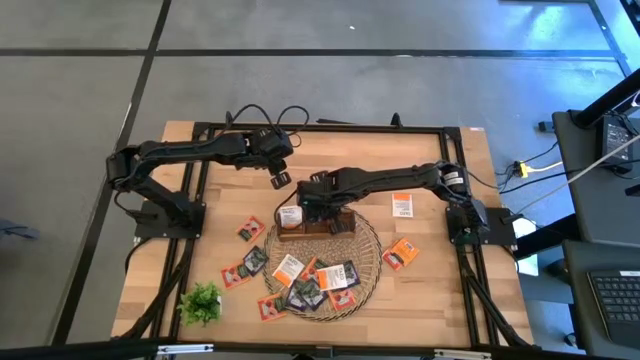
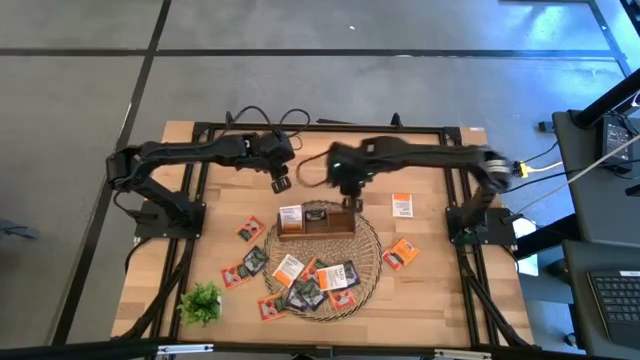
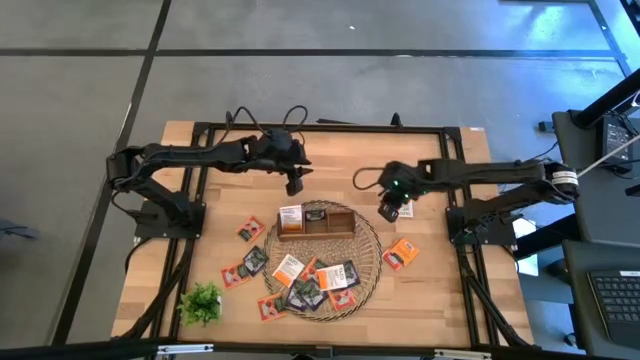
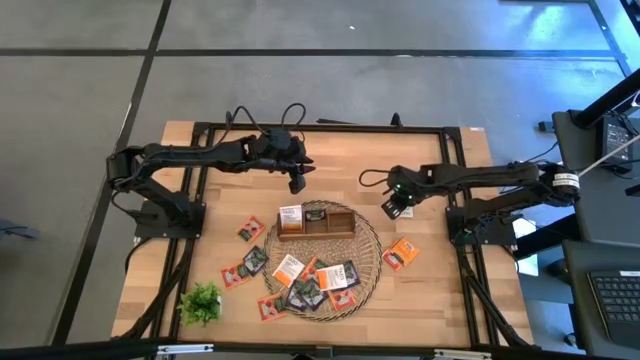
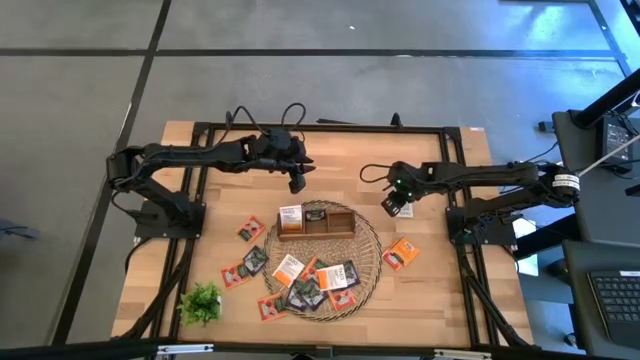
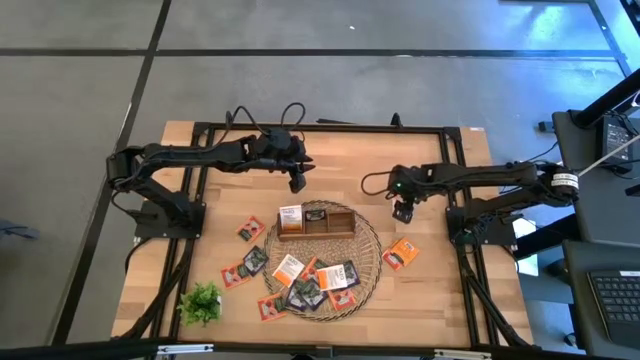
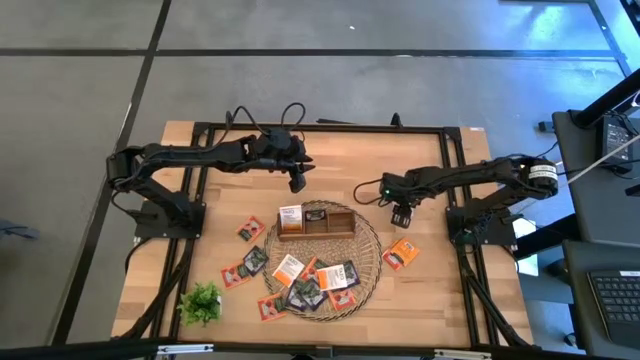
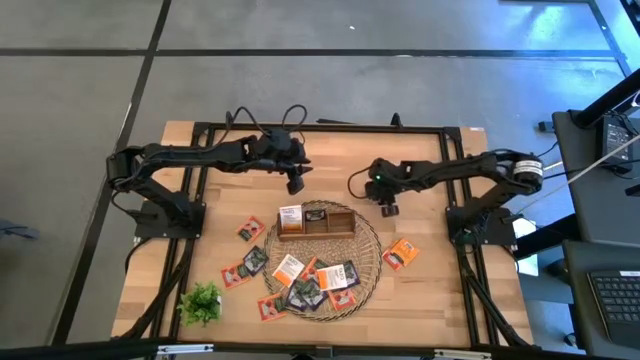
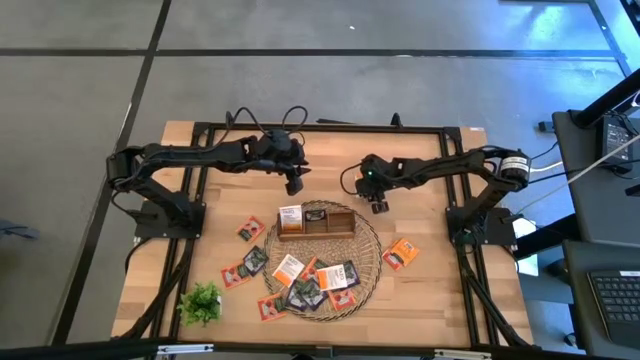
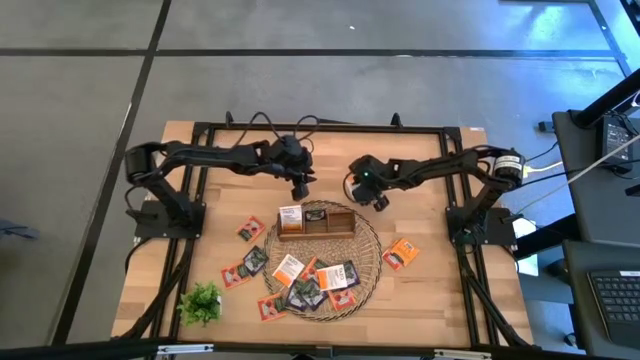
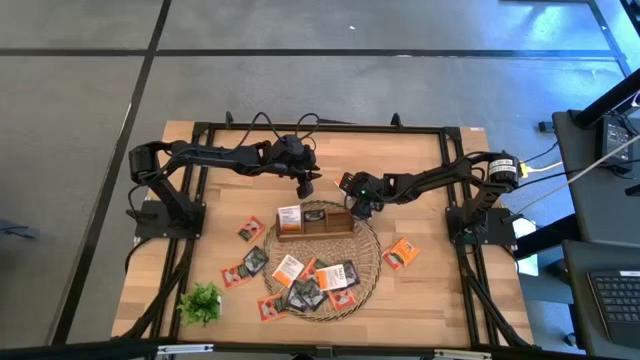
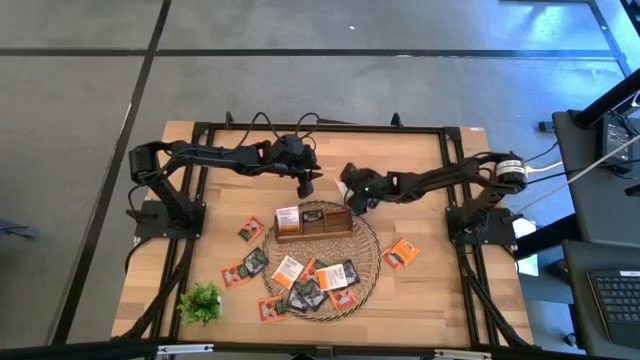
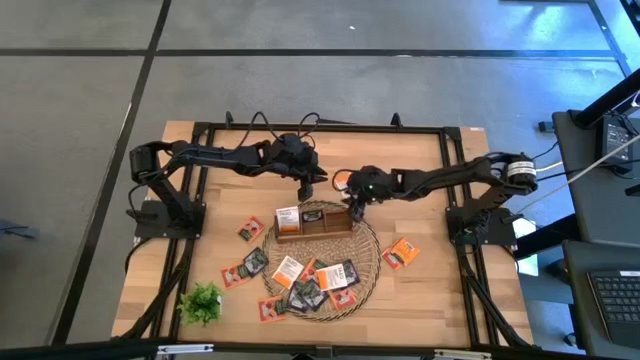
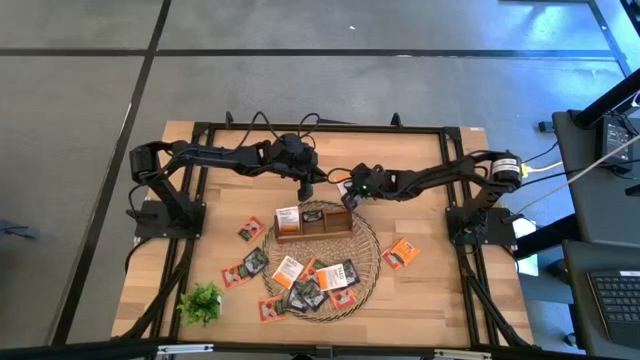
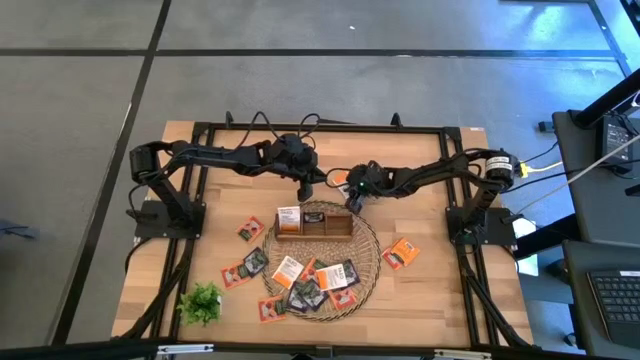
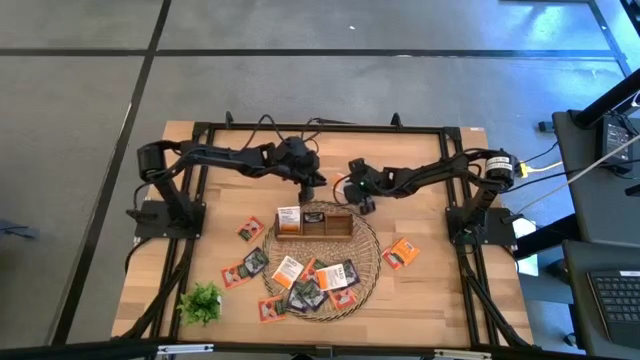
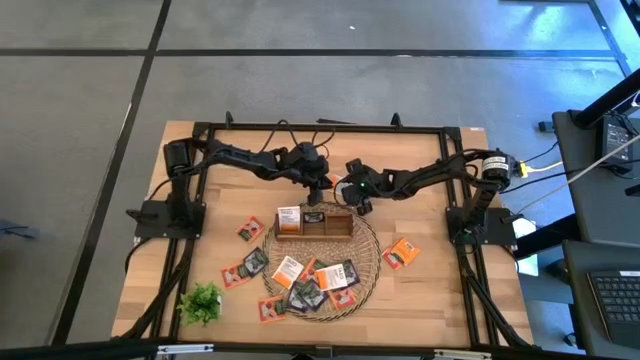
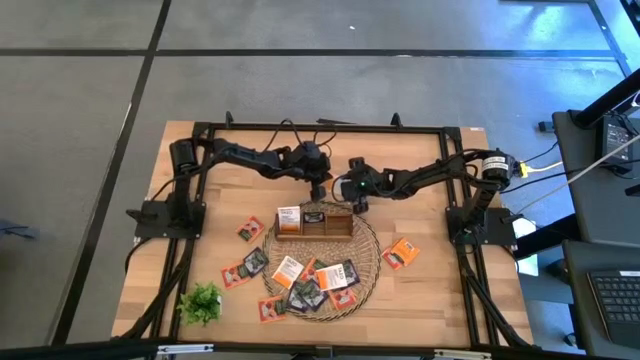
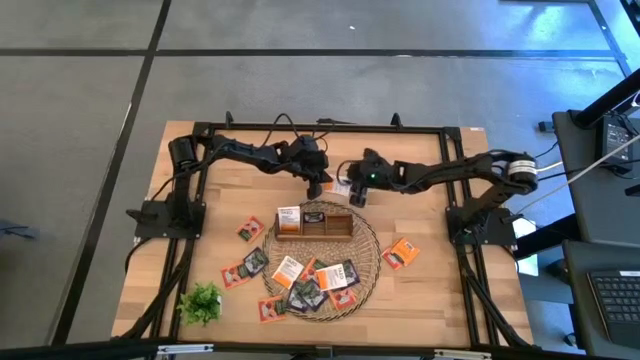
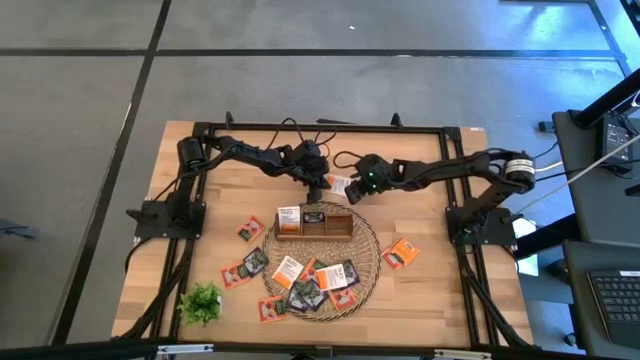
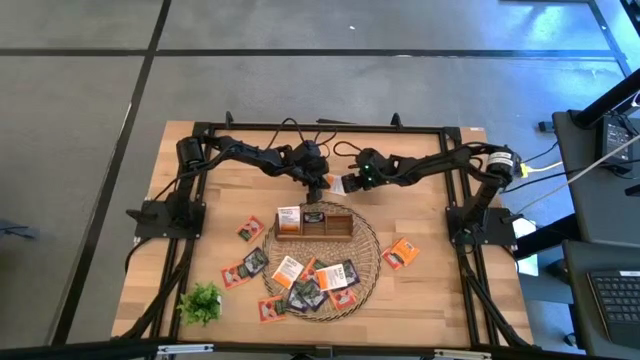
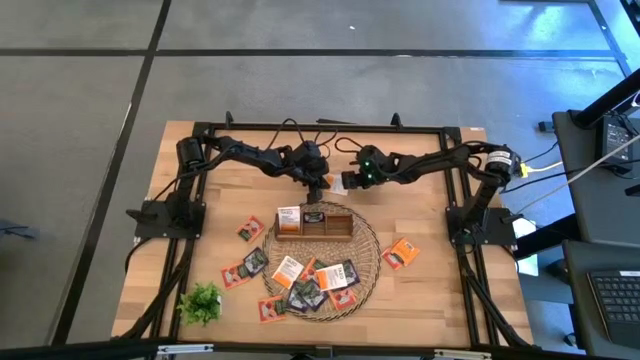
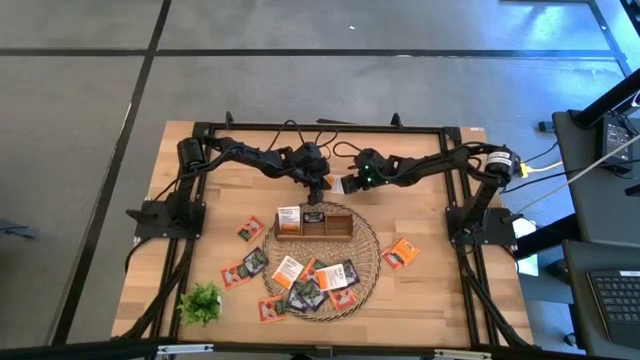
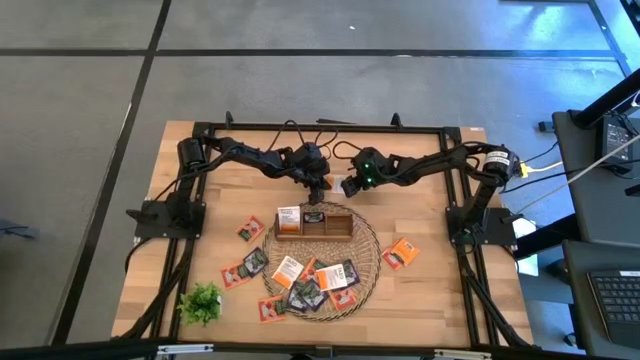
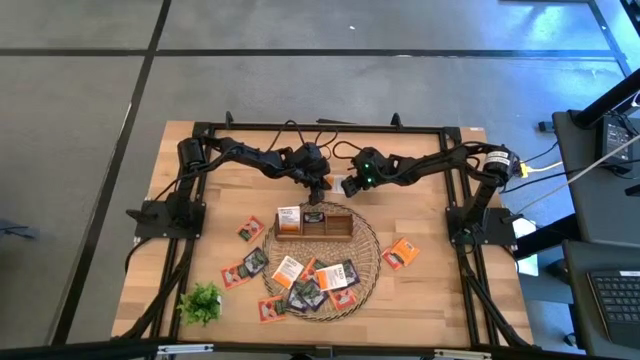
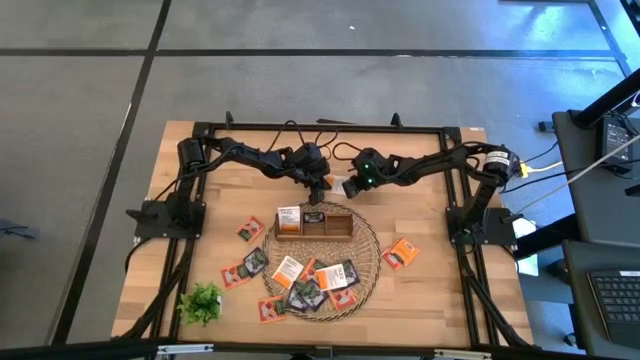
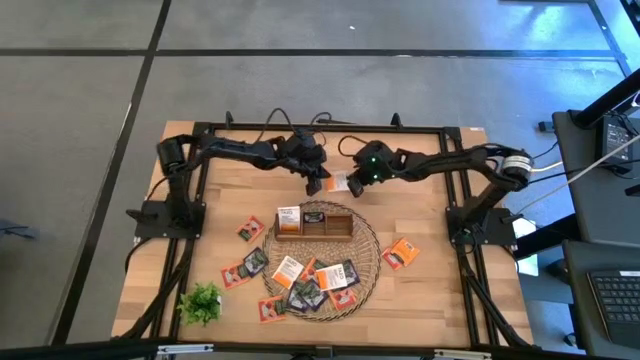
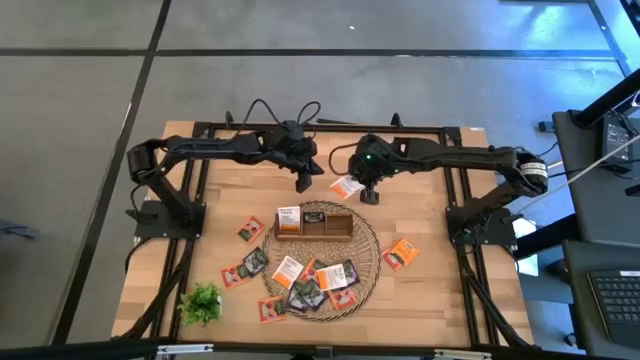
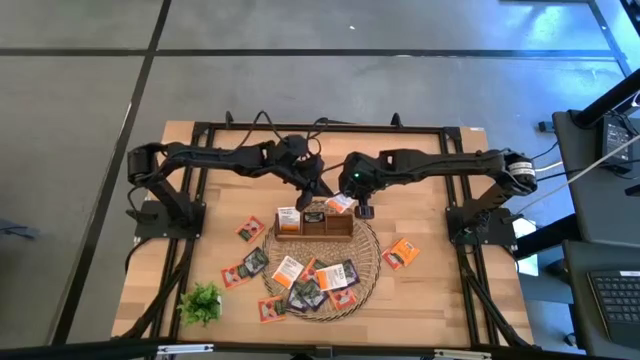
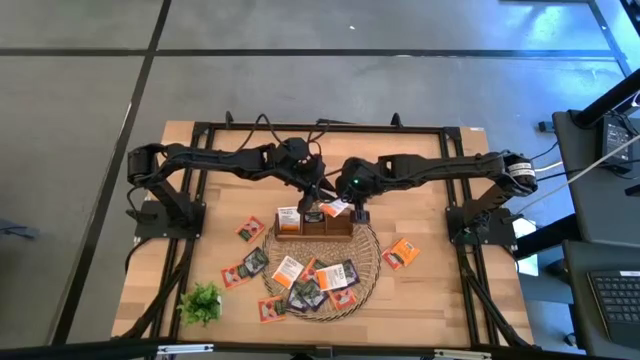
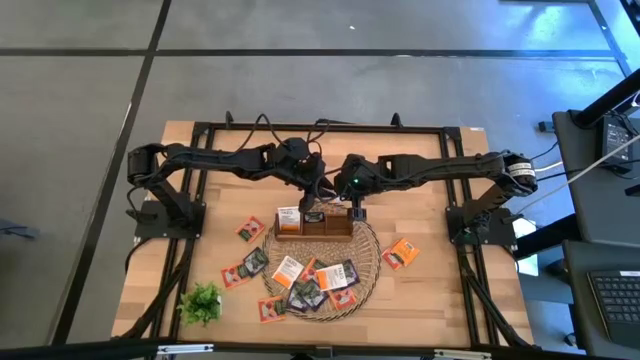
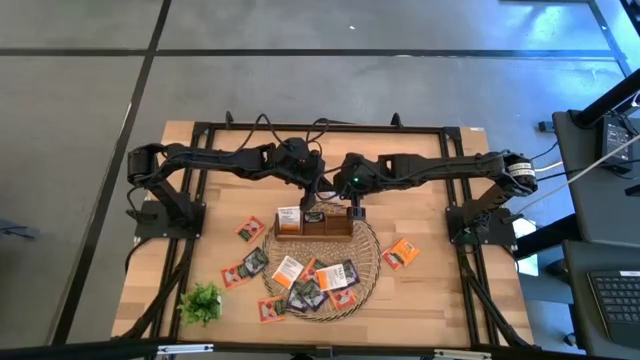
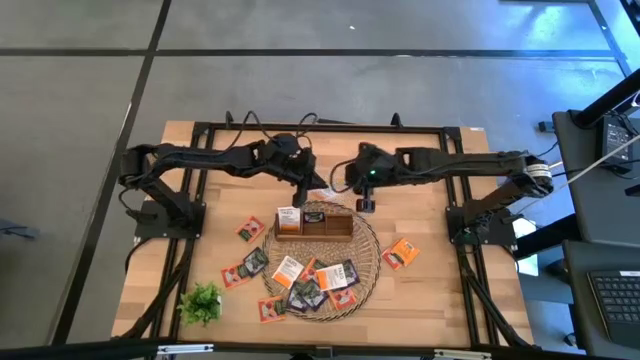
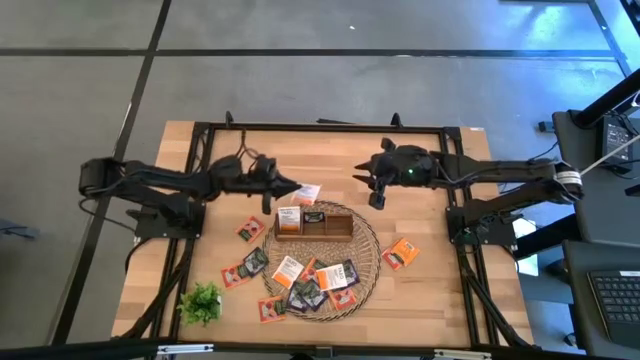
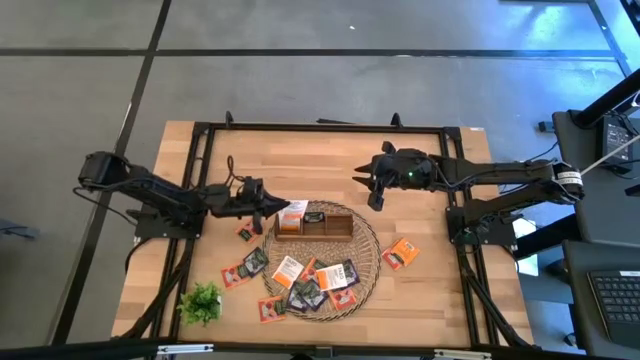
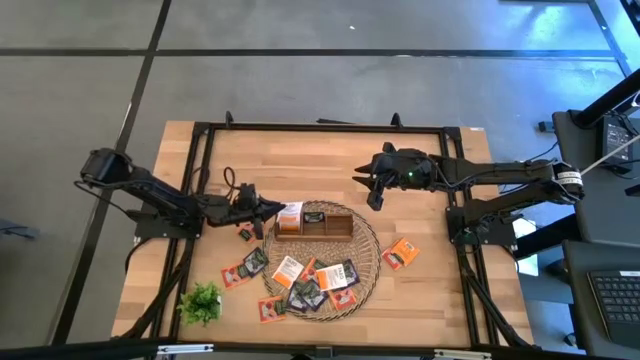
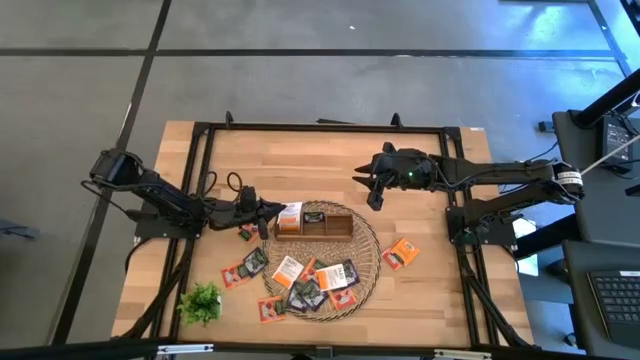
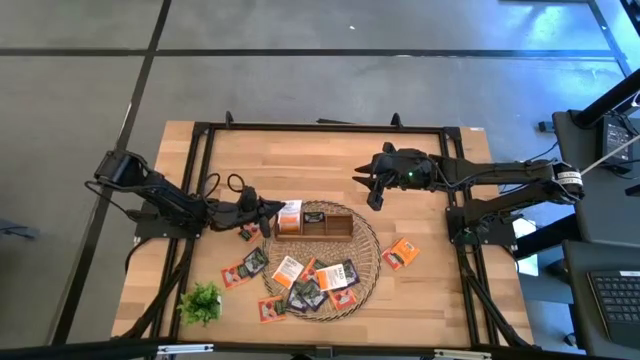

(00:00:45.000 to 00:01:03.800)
Task: Pick & Place Tea
Put the top right white tea bag into the left slot of the wooden organizer
